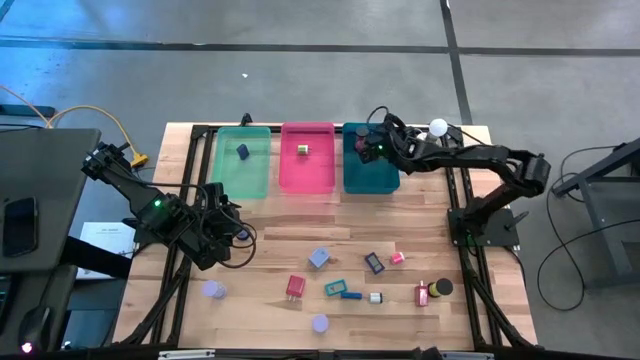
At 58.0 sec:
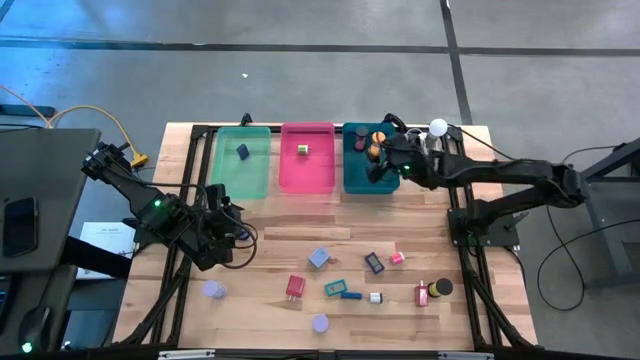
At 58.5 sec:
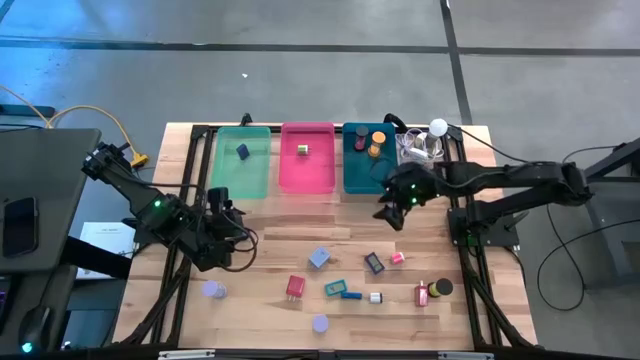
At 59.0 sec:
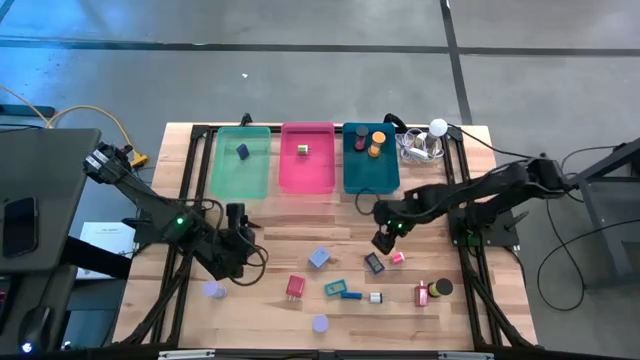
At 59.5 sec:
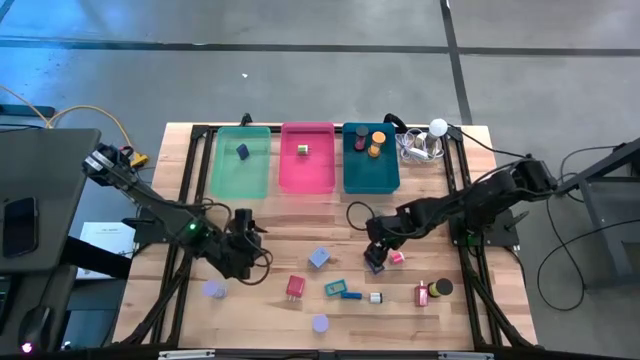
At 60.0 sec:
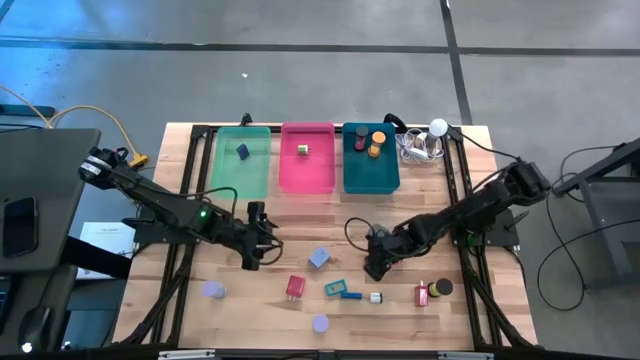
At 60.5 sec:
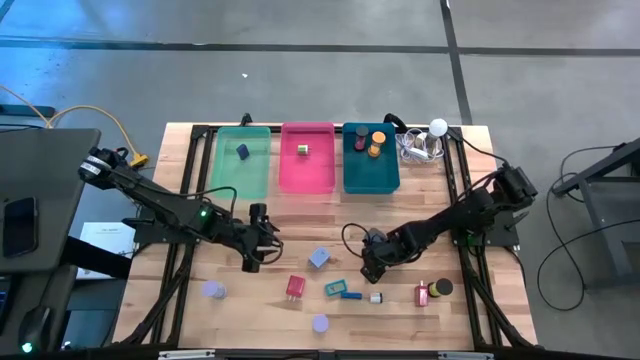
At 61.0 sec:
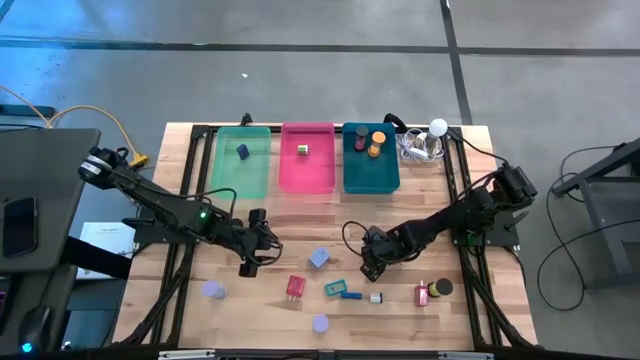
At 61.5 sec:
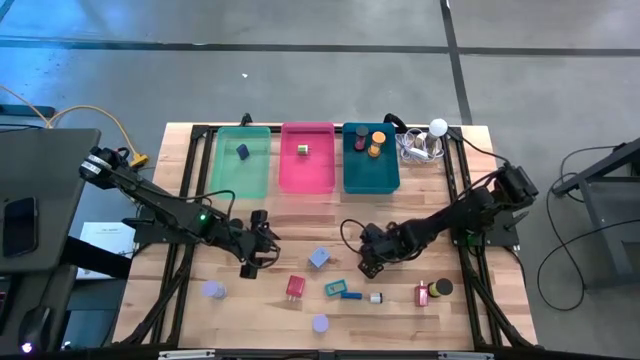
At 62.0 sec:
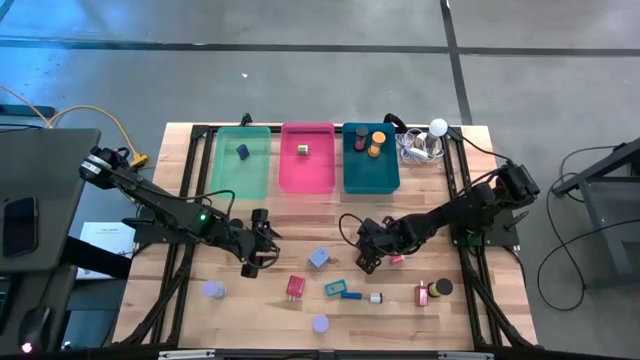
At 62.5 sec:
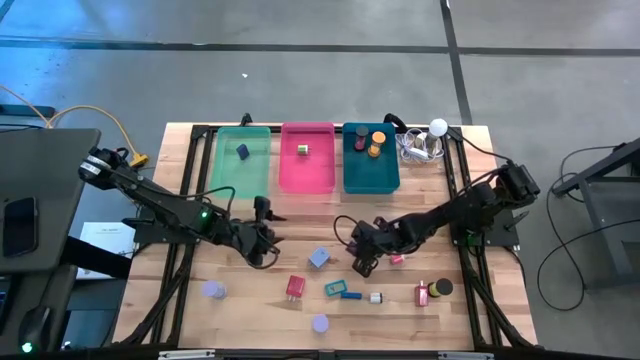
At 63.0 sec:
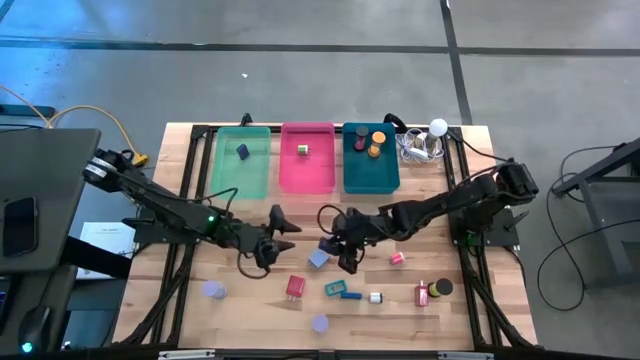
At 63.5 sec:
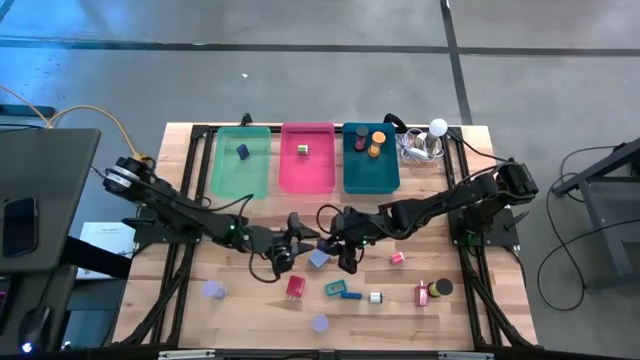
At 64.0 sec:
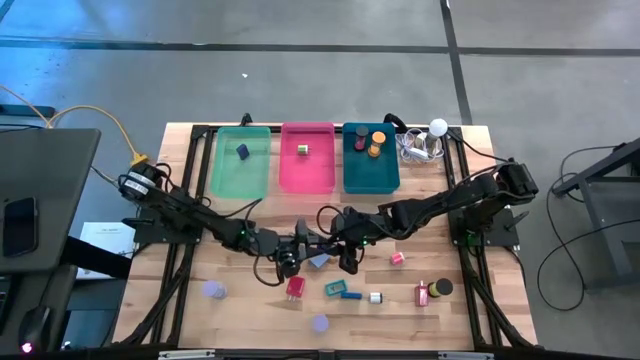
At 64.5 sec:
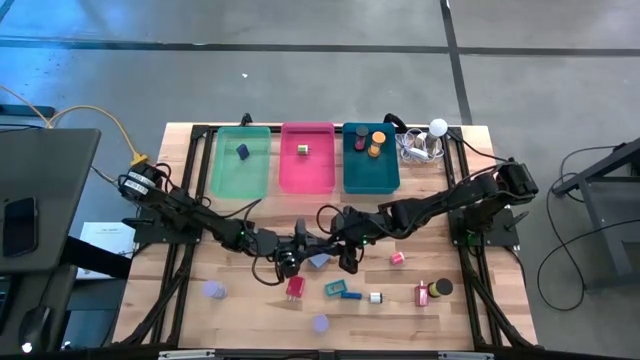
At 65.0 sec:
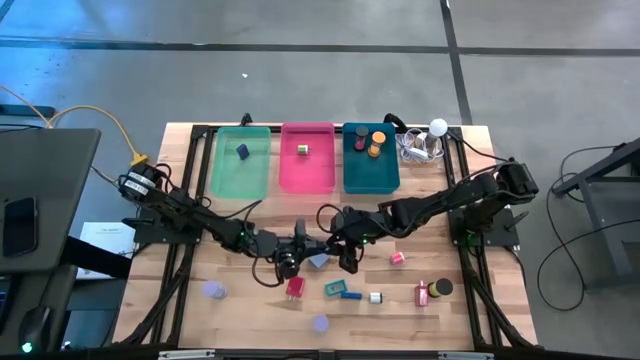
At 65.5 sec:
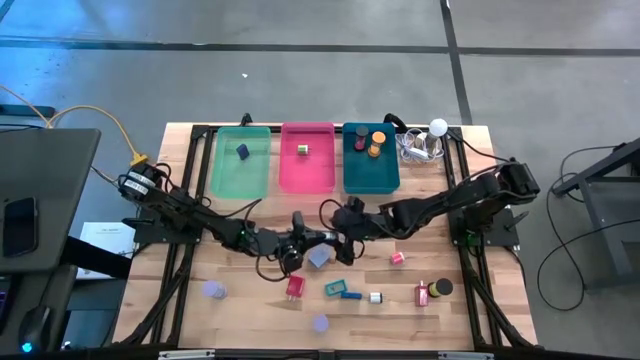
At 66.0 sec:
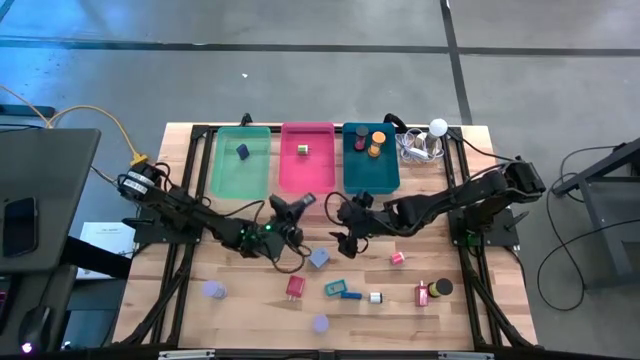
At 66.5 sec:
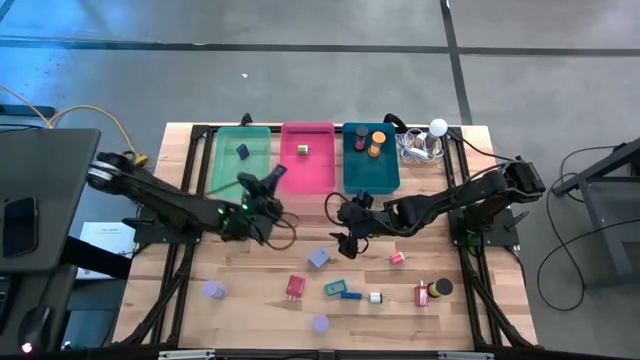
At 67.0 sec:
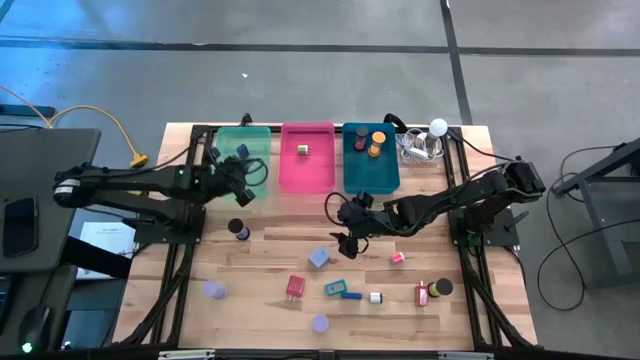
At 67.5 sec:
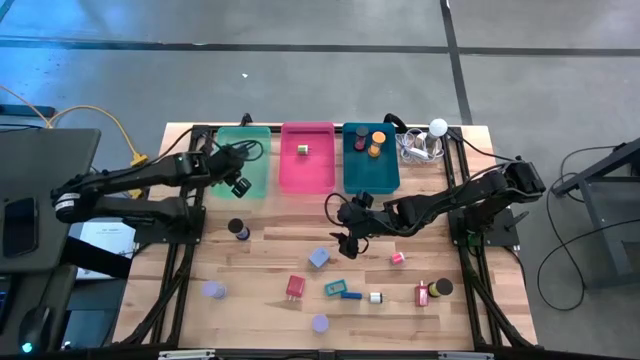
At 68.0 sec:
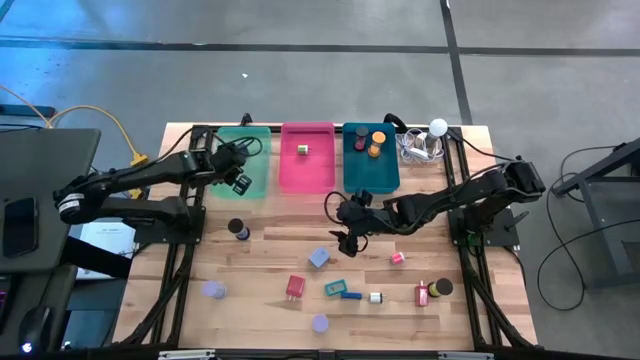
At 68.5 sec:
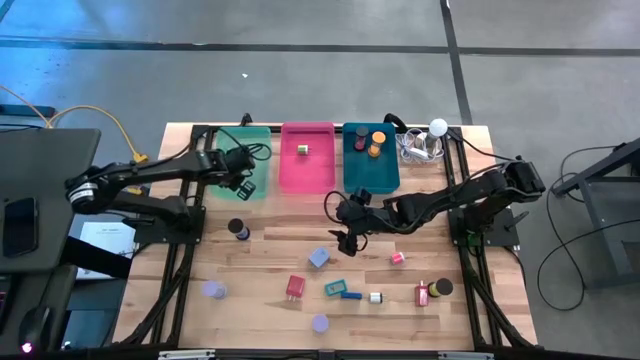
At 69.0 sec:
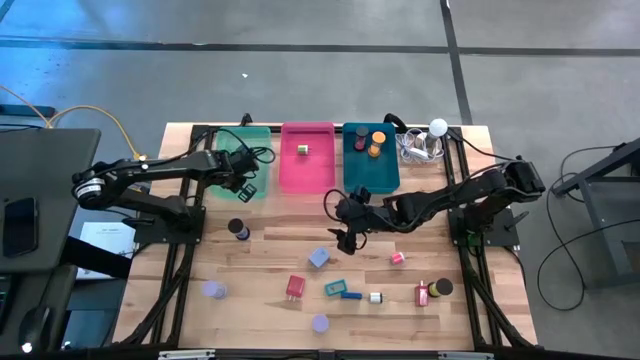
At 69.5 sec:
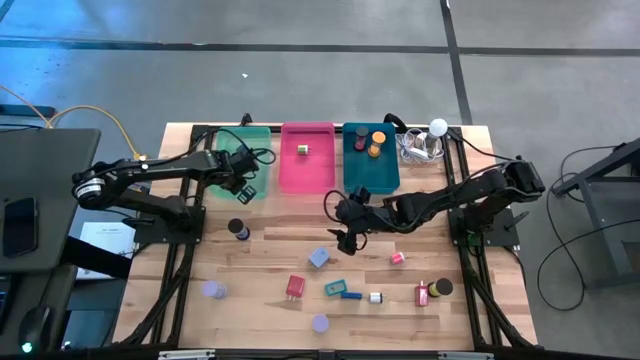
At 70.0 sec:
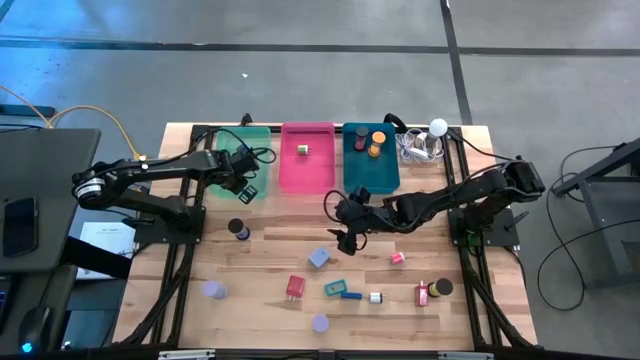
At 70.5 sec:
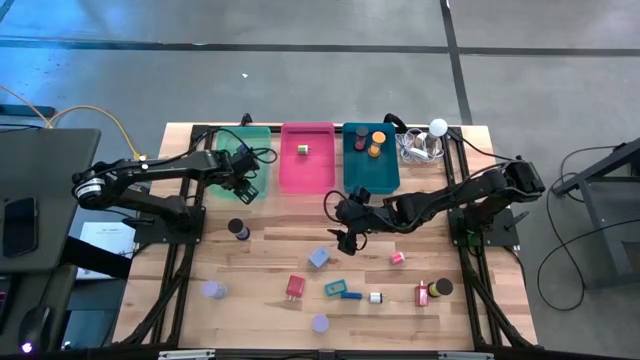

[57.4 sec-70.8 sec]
Task: Pick & Place Office items
Put the top dark blue digital timer into the green bin

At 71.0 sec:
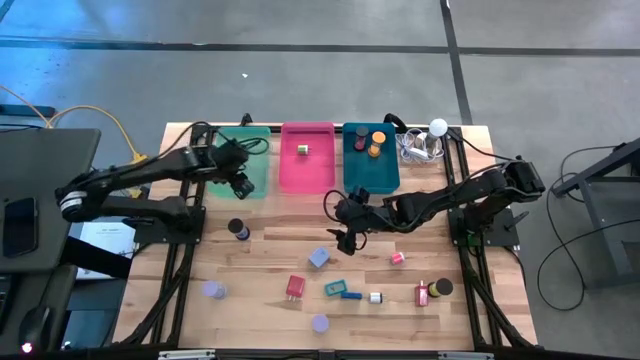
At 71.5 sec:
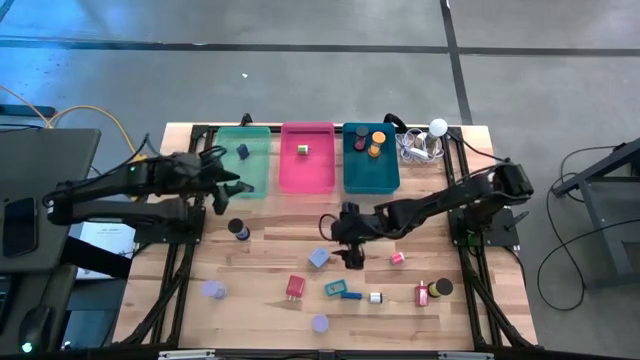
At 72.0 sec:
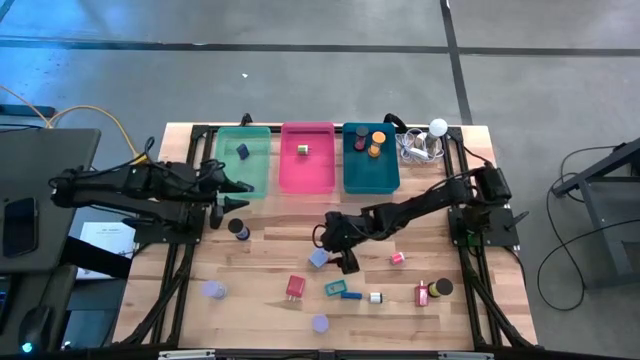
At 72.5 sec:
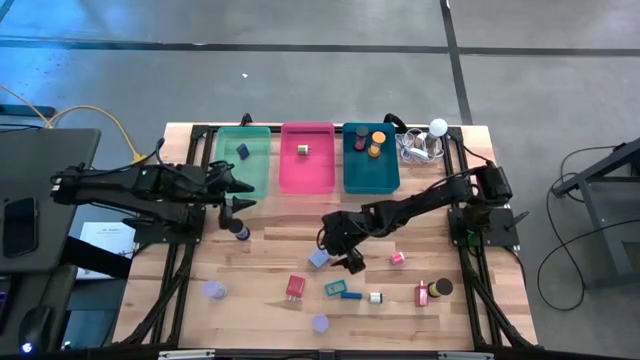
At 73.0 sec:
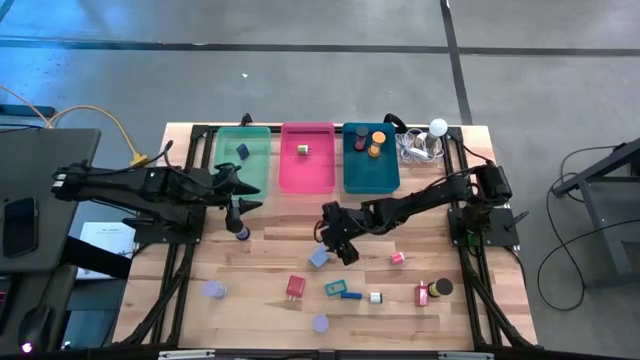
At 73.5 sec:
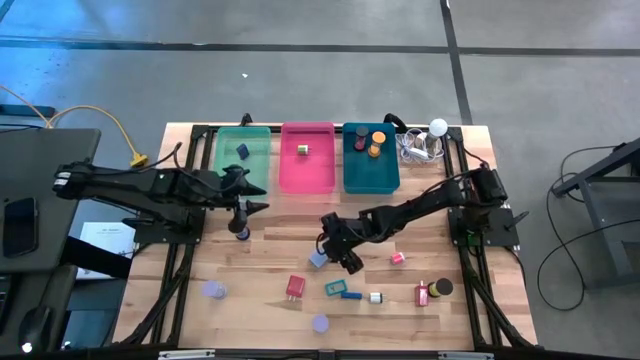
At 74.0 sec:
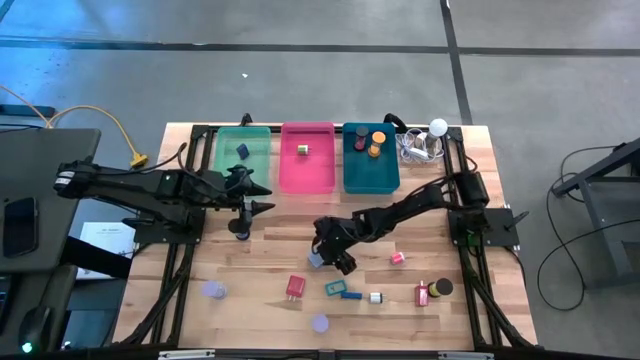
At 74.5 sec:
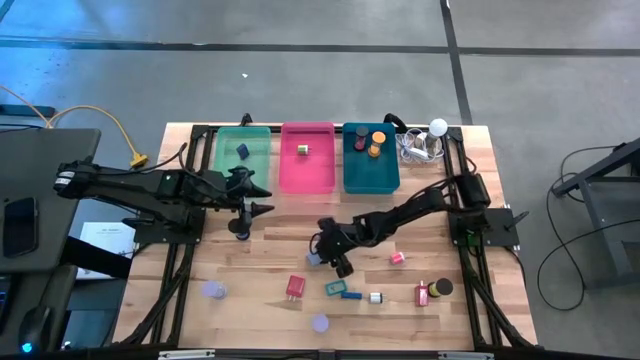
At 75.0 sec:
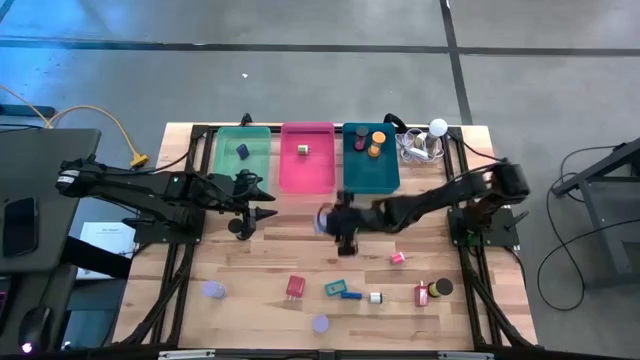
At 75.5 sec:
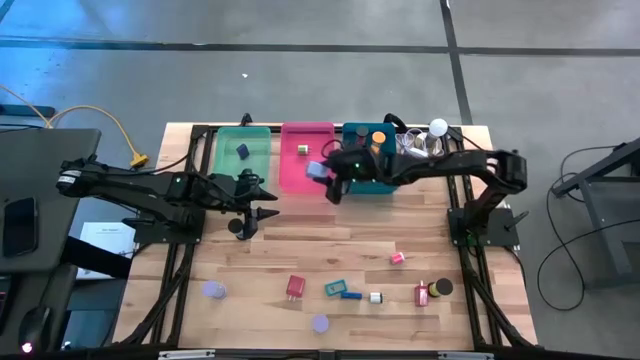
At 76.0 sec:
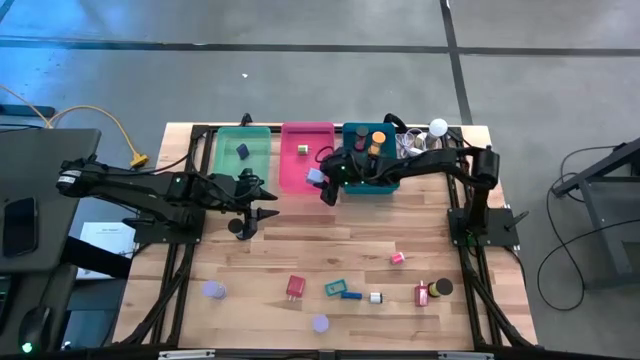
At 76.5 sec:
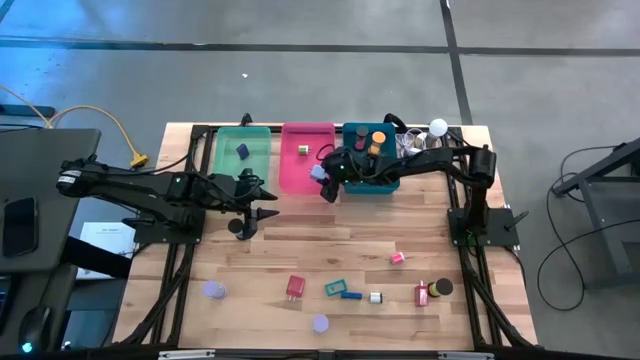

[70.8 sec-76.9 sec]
Put the purple charger adapter into the red bin
